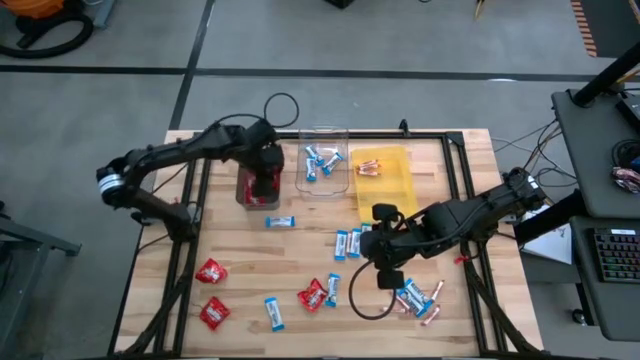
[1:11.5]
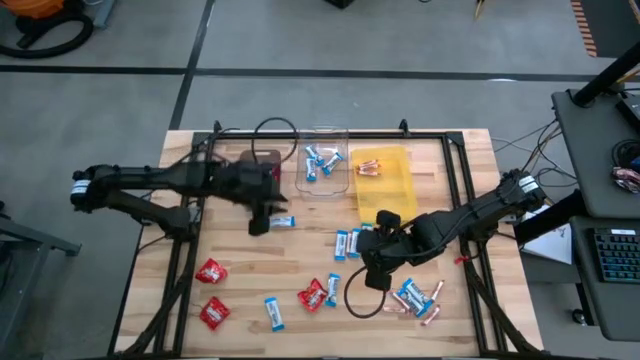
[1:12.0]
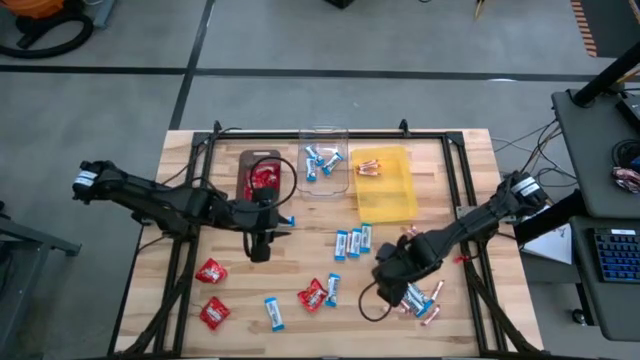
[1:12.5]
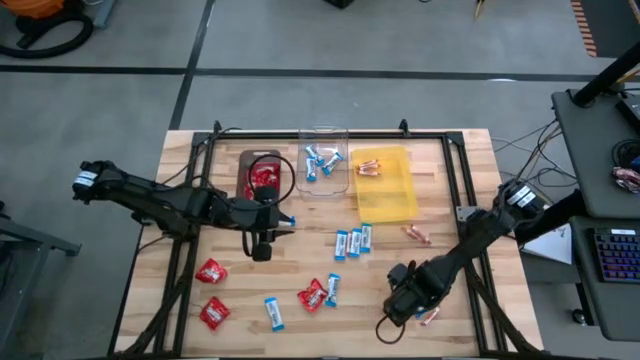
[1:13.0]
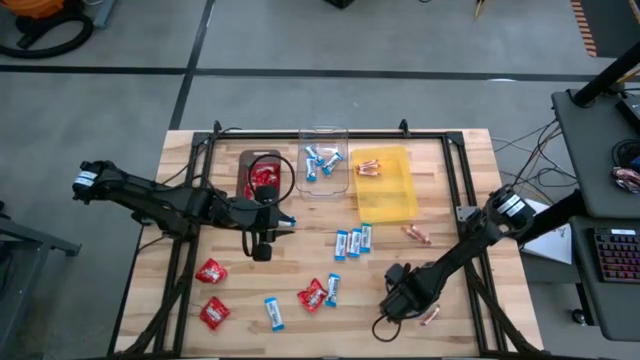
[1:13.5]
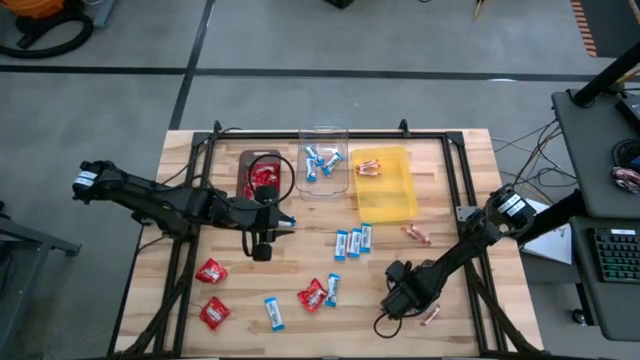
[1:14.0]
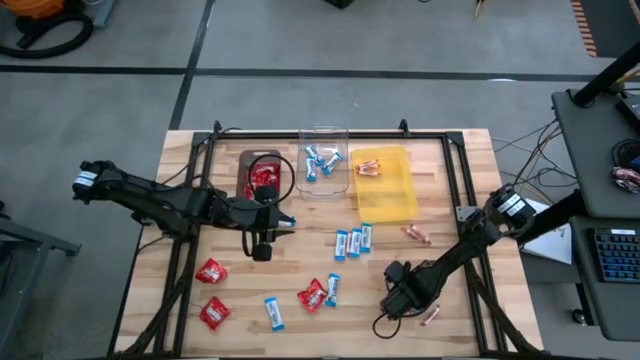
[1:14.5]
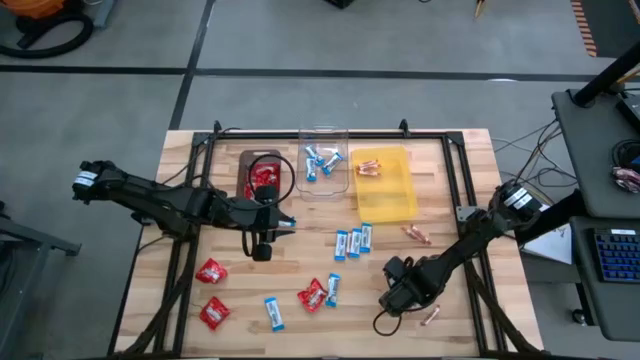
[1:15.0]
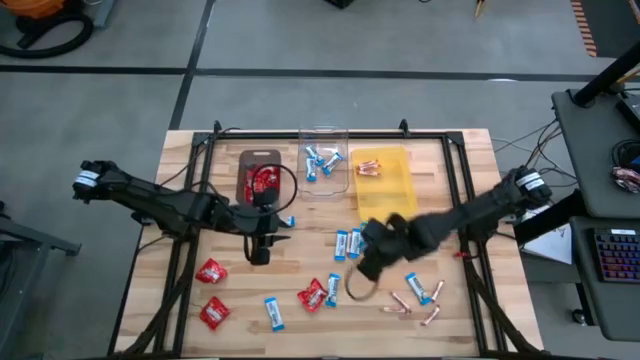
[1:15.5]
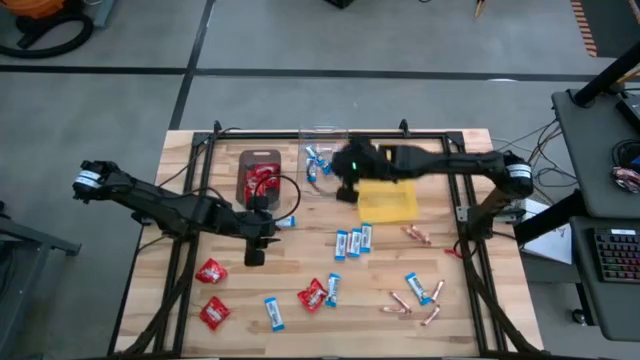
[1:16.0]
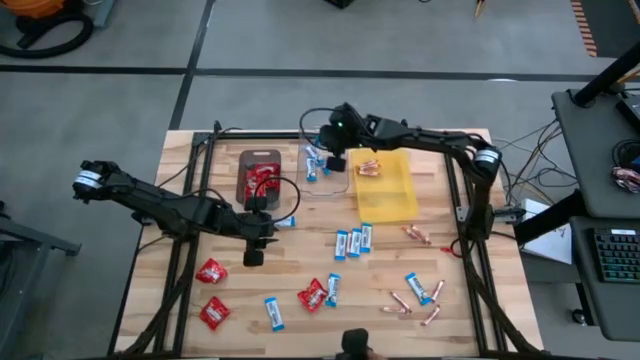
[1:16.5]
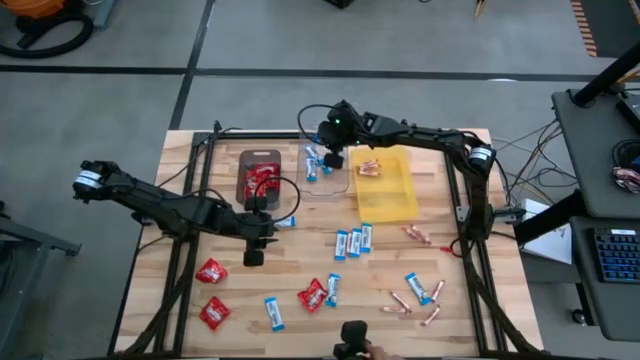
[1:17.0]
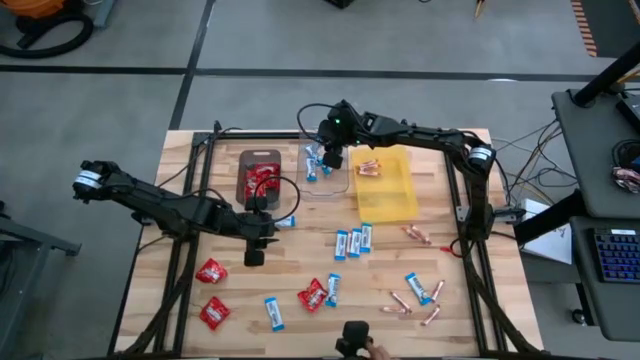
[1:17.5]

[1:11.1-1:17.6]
Task: Sort candy
Put the white chocolate into the transparent bin

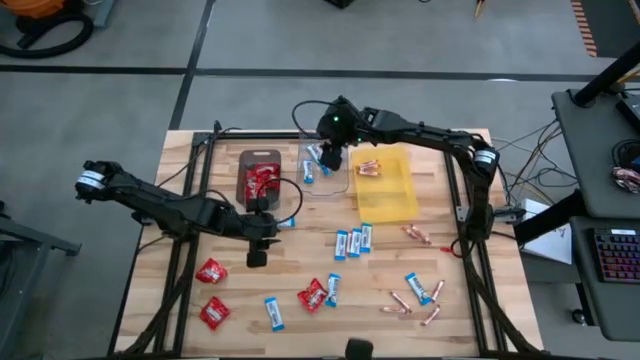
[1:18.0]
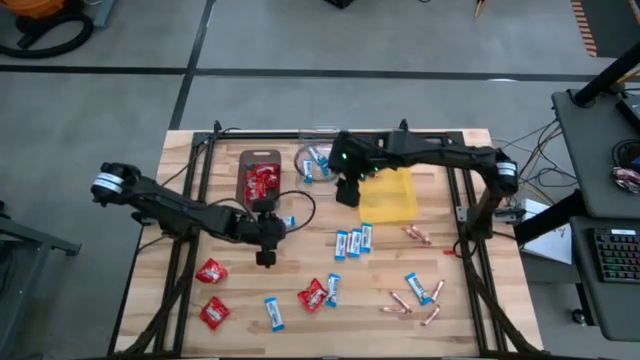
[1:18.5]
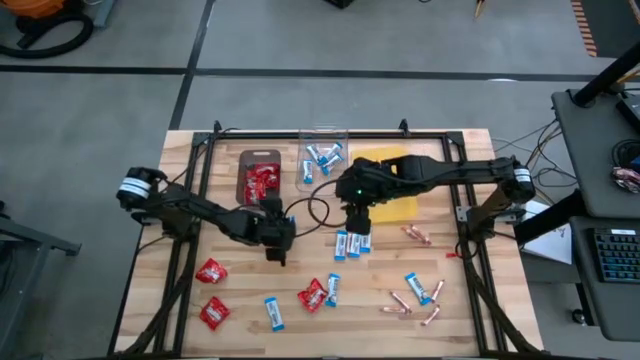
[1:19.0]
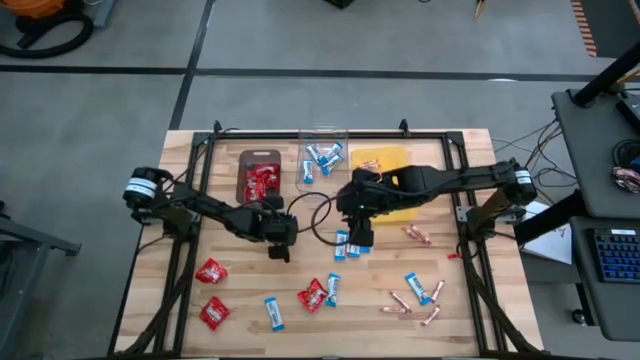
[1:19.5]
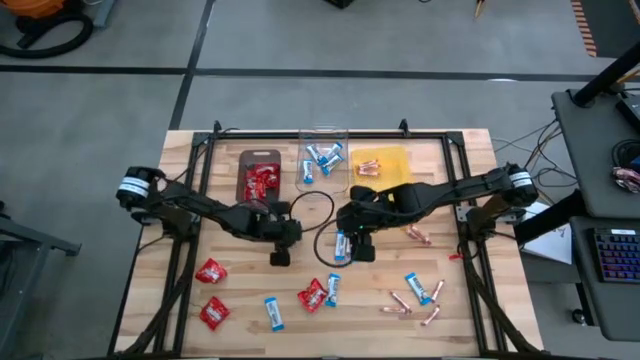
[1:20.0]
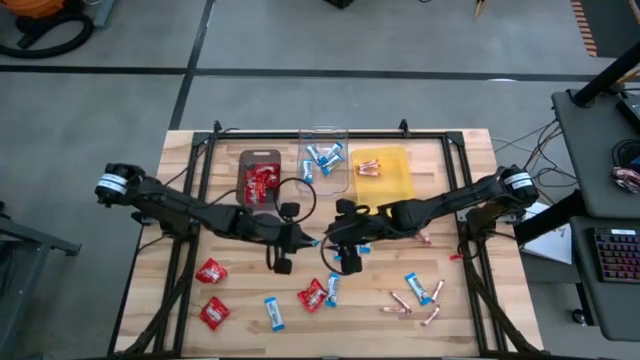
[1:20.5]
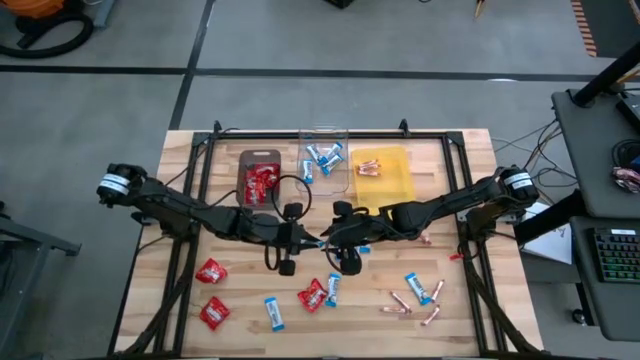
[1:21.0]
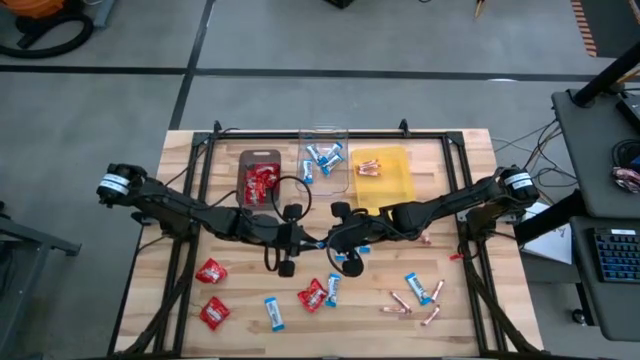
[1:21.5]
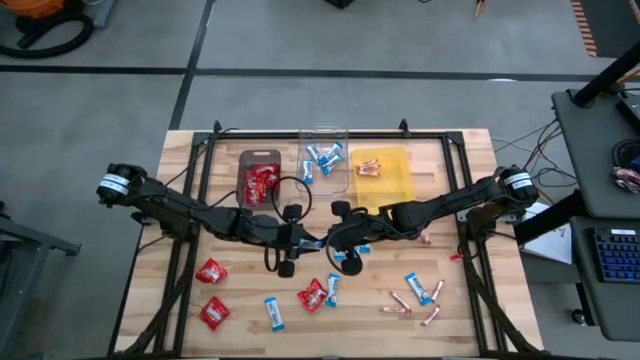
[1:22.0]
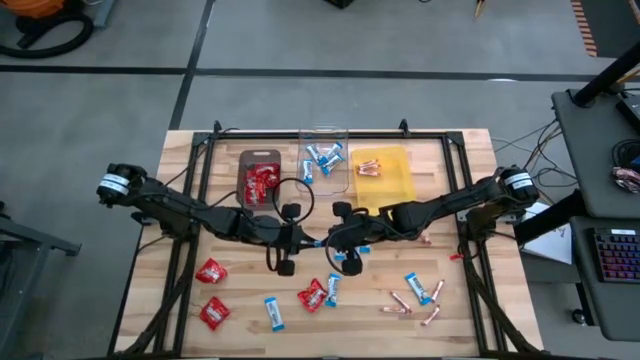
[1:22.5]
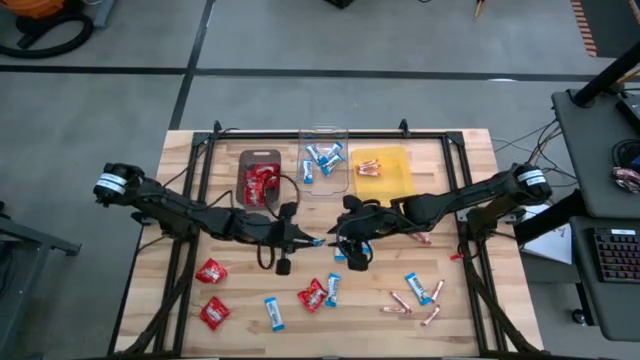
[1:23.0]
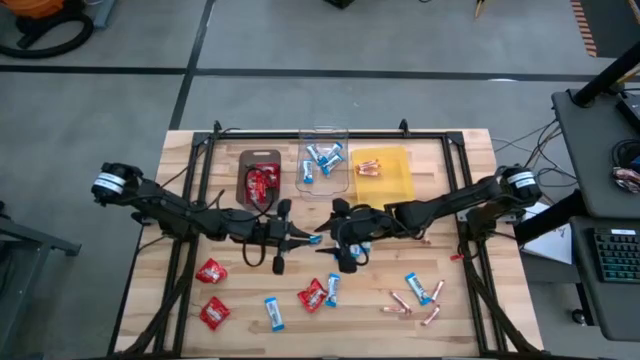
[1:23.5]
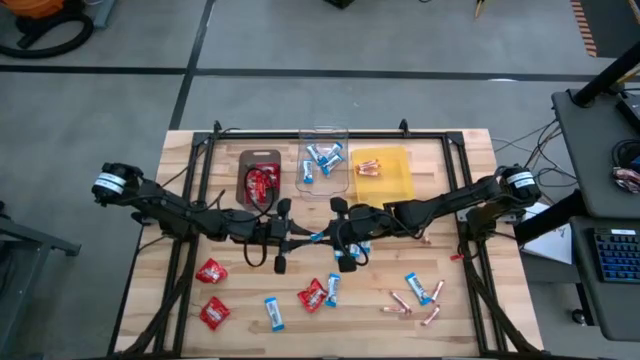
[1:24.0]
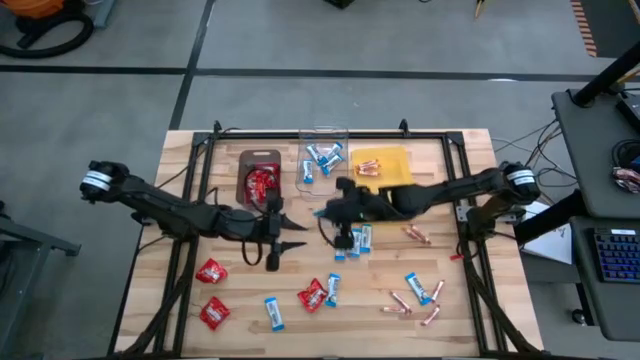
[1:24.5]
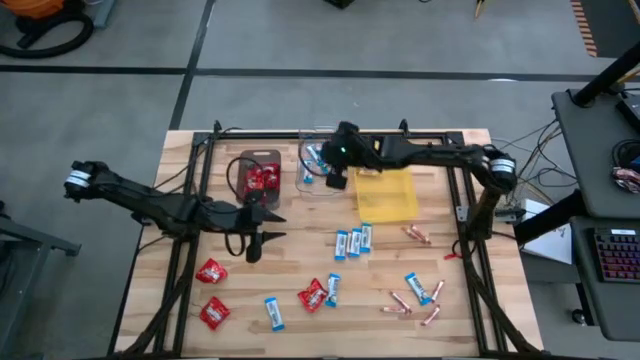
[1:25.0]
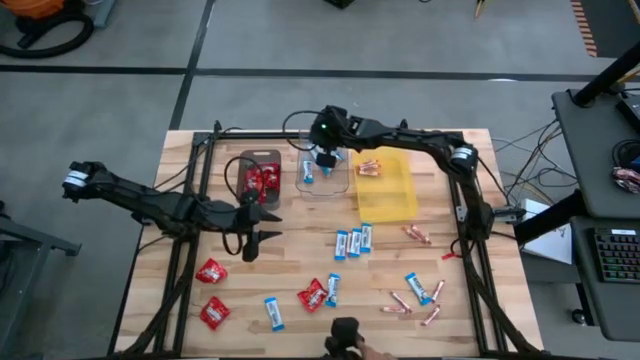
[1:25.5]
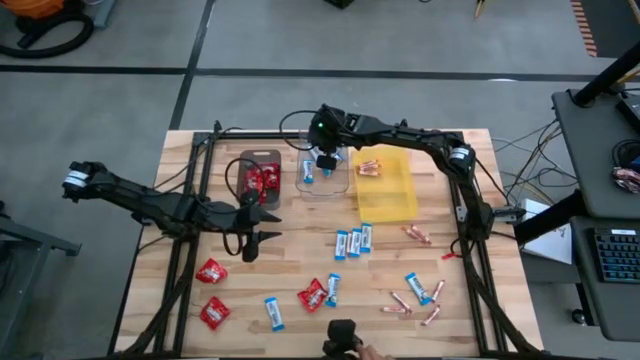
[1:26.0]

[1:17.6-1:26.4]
Put the white chocolate into the transparent bin

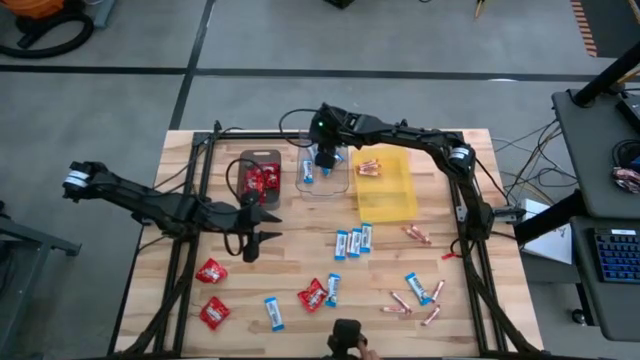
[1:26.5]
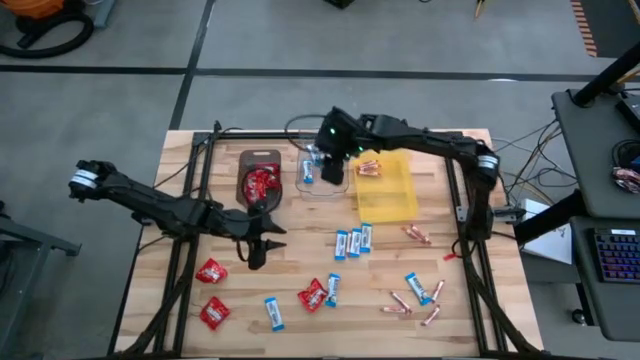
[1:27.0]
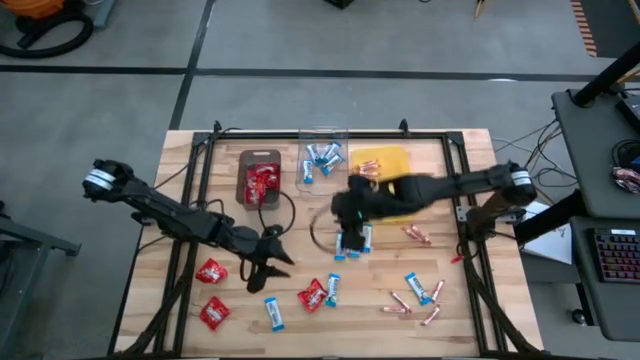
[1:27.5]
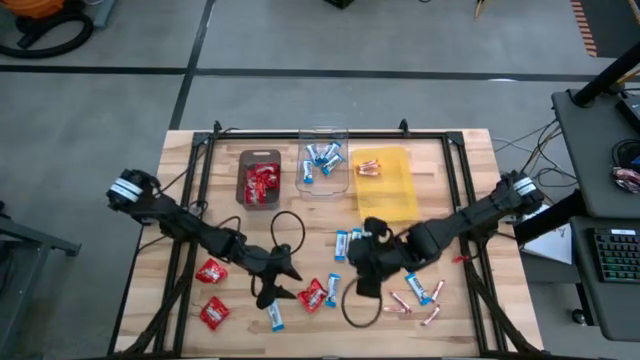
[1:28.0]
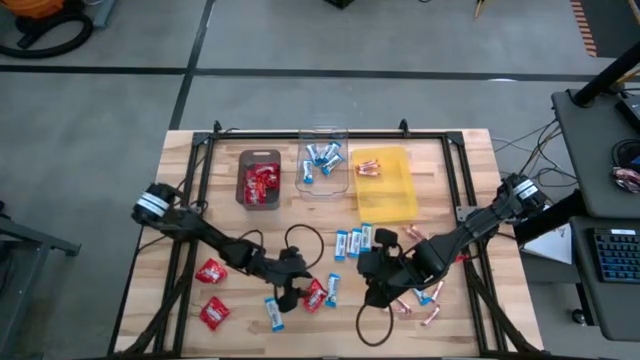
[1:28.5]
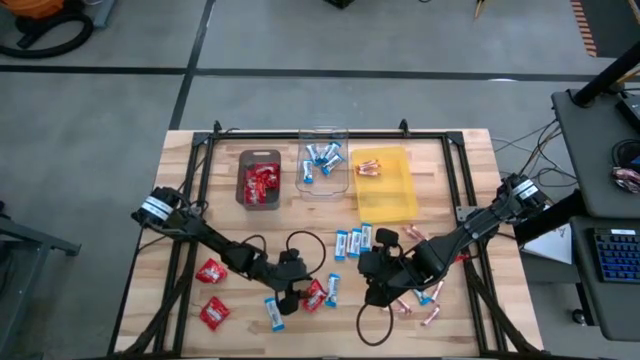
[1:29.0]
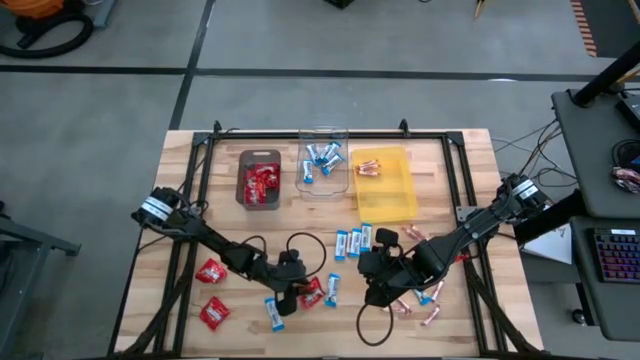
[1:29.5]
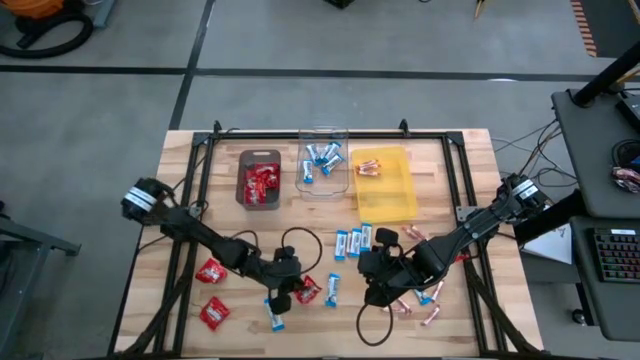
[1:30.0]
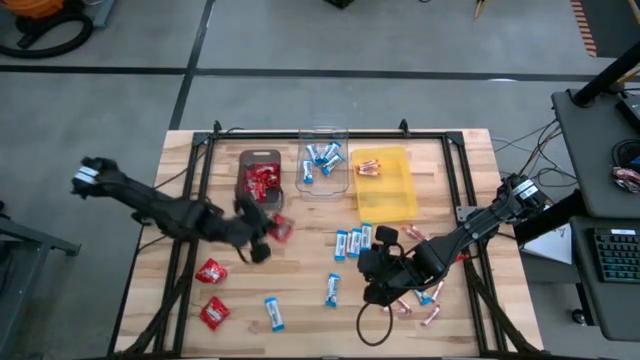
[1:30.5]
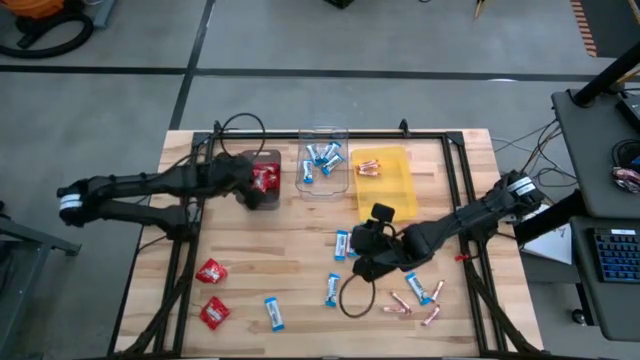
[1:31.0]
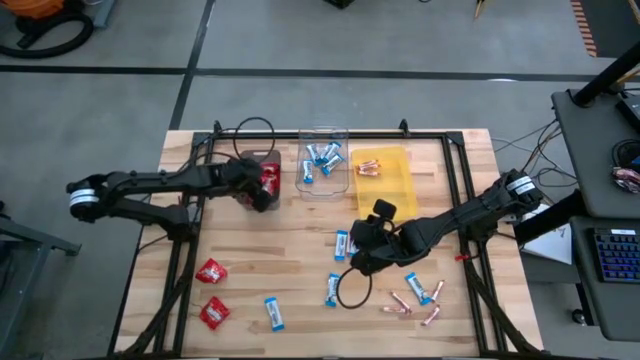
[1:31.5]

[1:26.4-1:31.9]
Put the red candy into the black bin

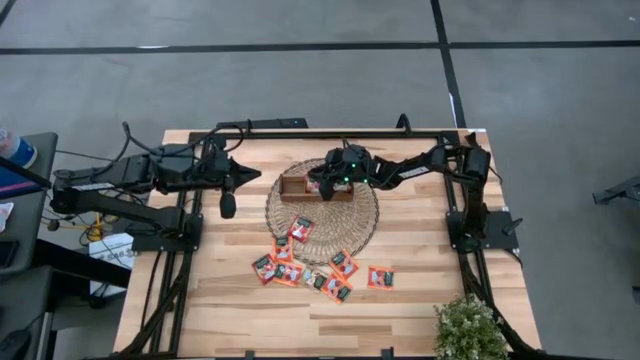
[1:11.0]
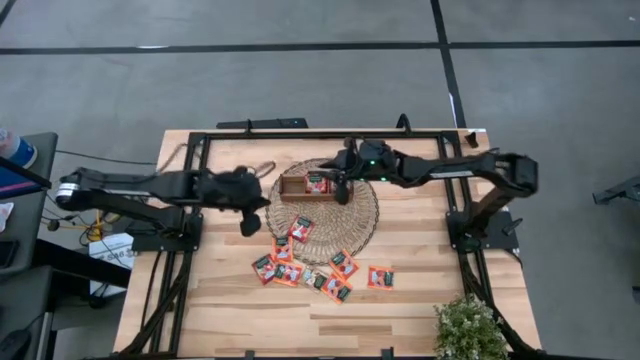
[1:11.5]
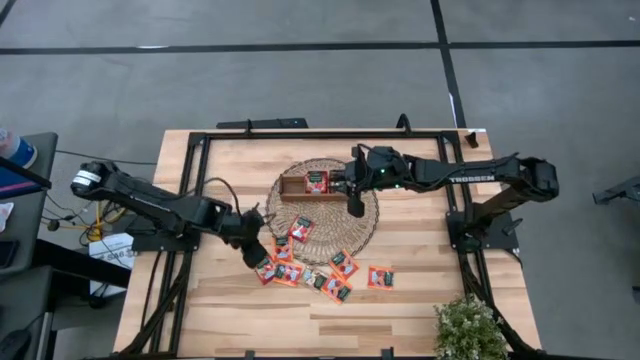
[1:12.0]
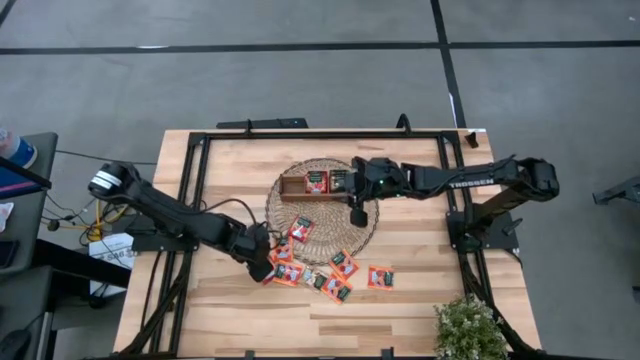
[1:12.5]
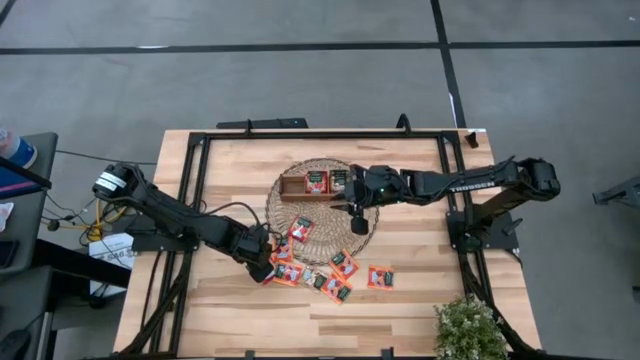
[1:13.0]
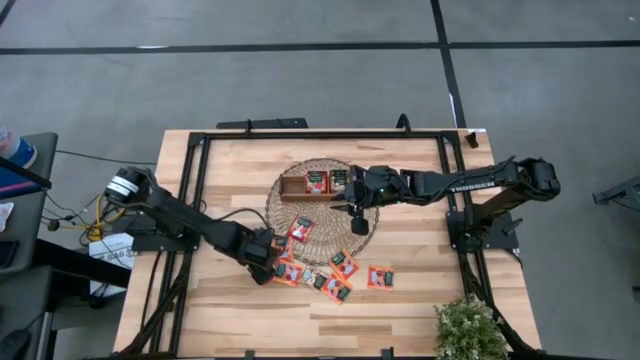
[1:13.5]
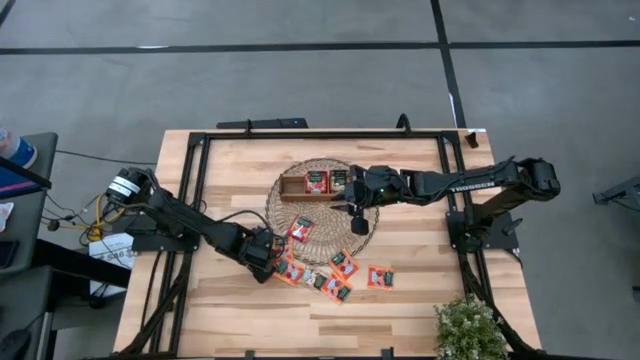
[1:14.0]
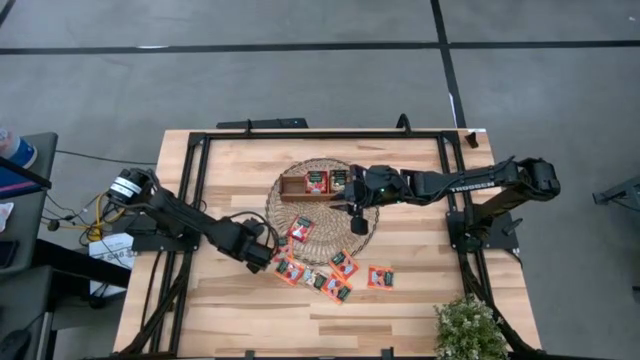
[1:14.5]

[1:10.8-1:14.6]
Task: Pick & Place Tea
Put the left red tea bag into the middle section of the wooden organizer
